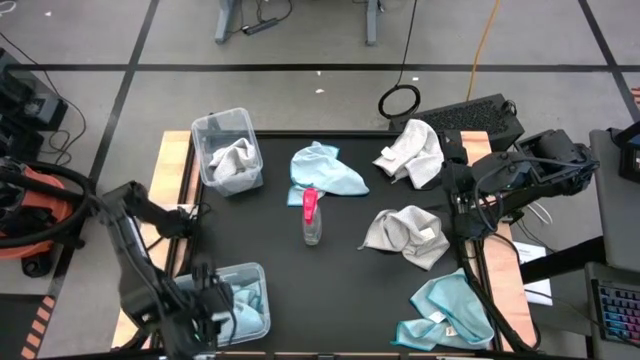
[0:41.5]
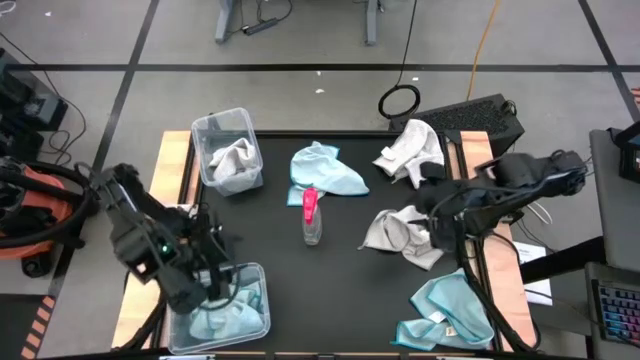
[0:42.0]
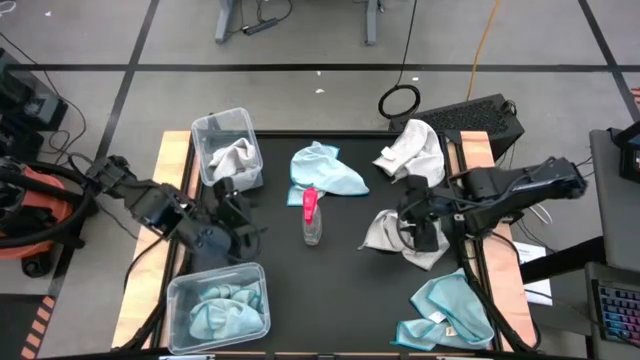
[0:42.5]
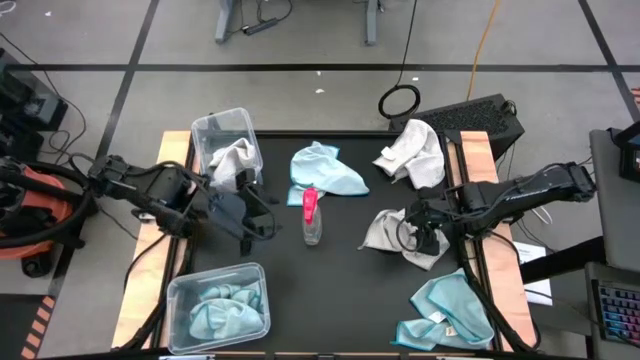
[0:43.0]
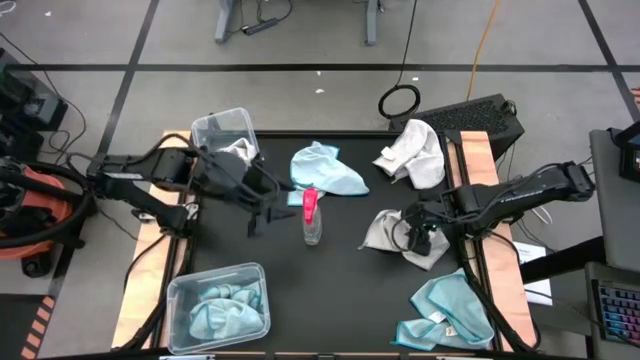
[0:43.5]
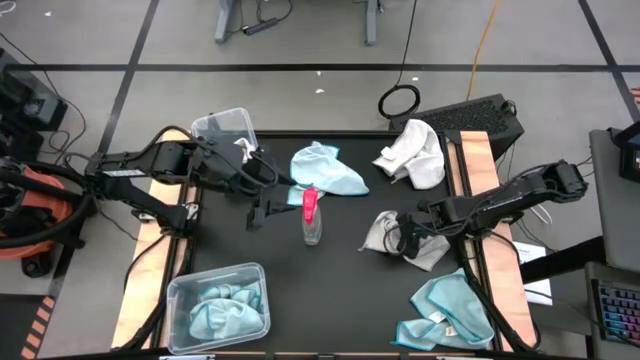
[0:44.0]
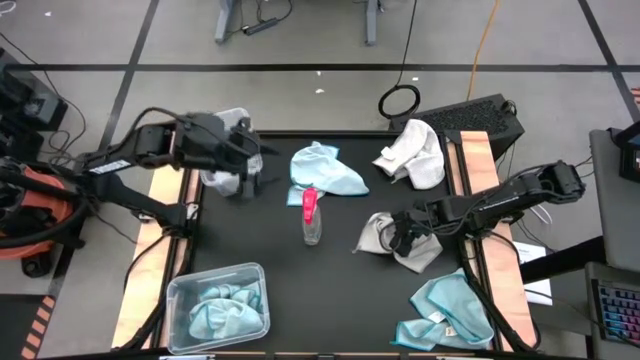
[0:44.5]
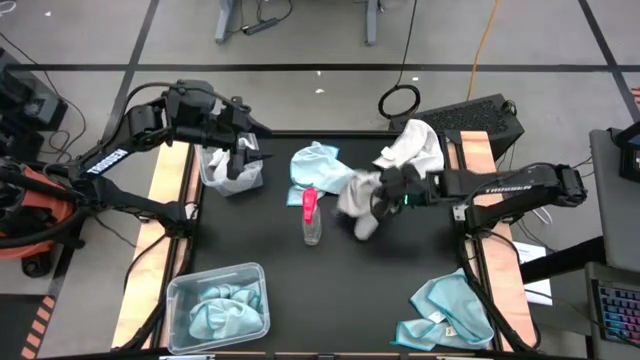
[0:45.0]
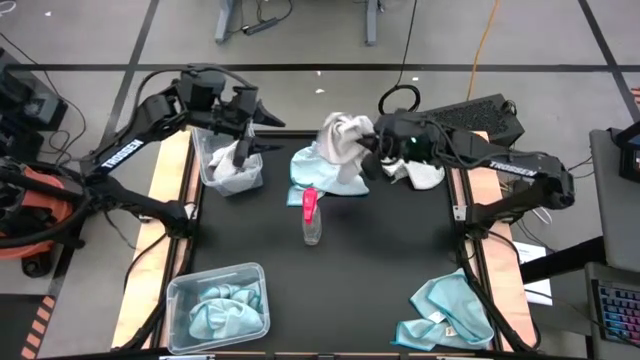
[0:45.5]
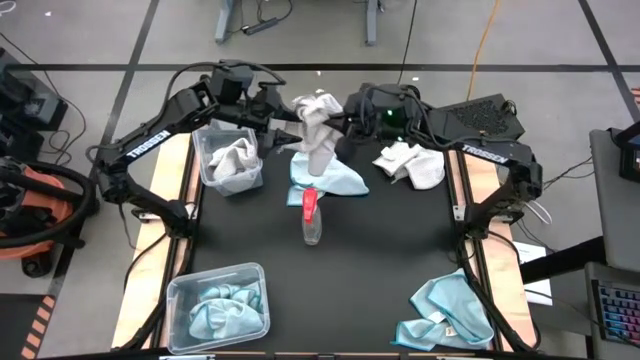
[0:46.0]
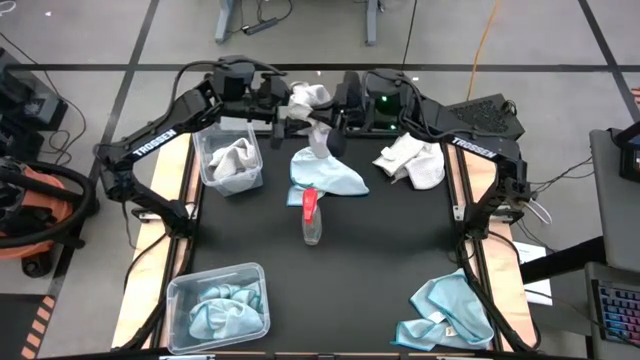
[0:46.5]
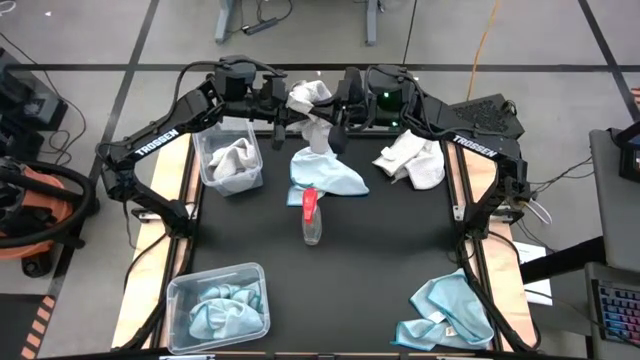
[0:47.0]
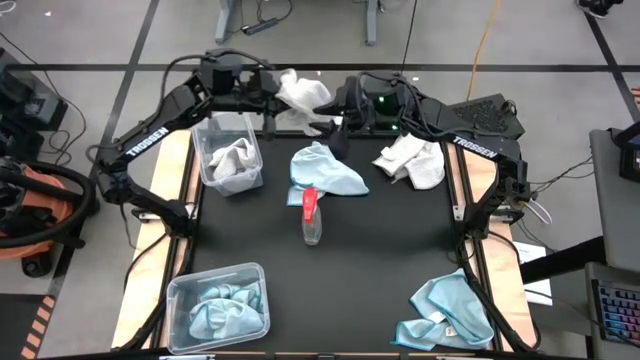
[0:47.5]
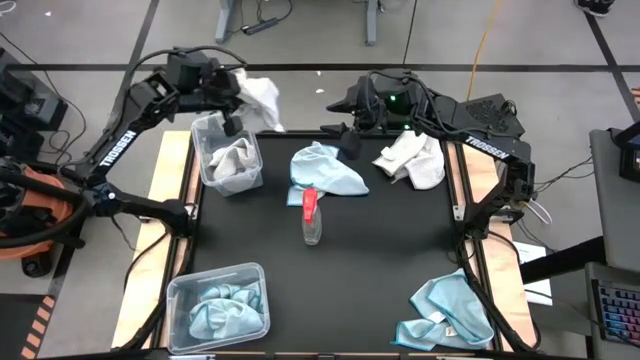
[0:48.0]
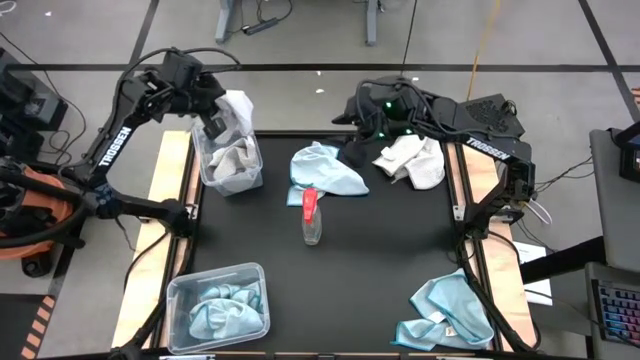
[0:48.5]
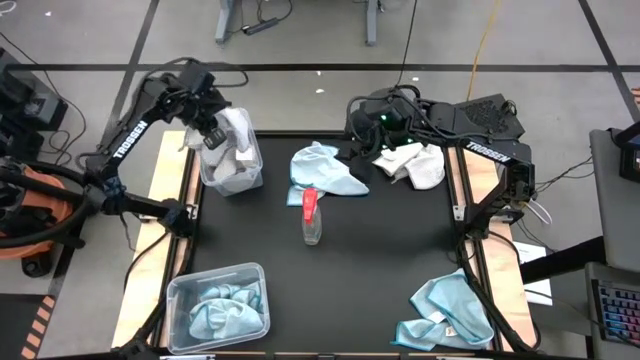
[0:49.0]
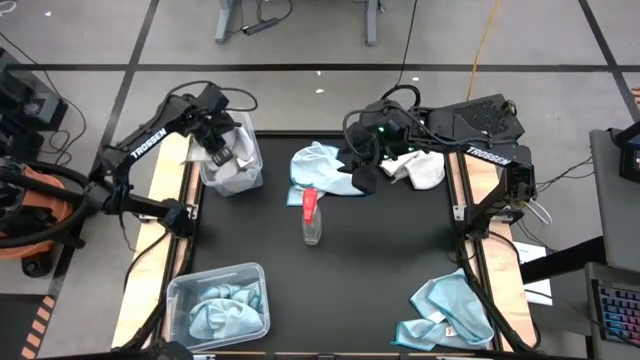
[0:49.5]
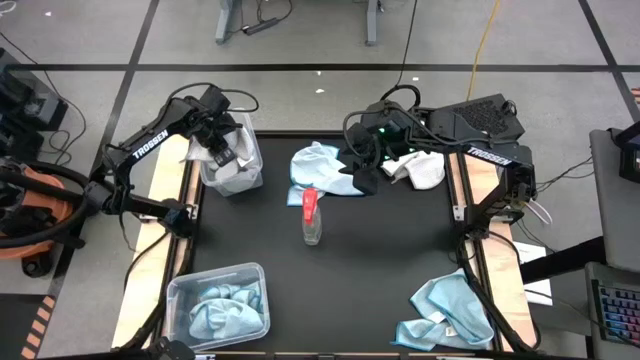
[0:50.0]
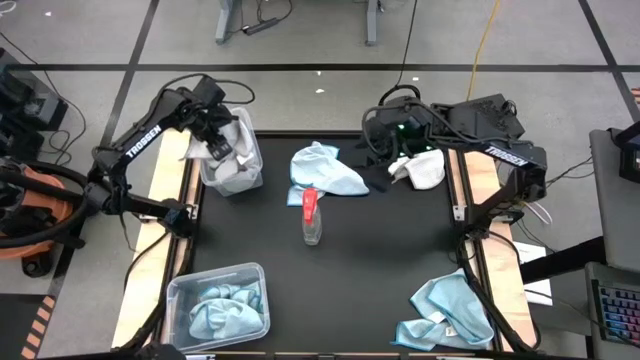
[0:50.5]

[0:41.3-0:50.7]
Task: Sort microfiber towel by color & place in baskets
Put the gray towel into the top transparent bin

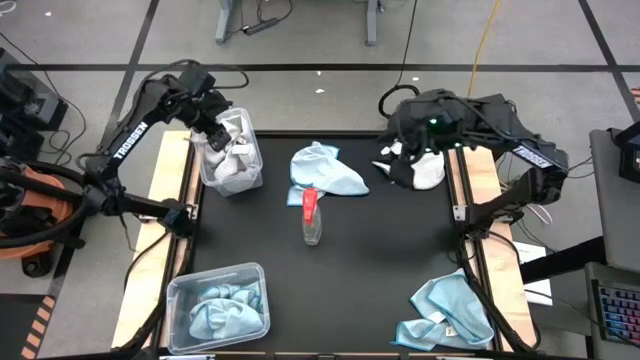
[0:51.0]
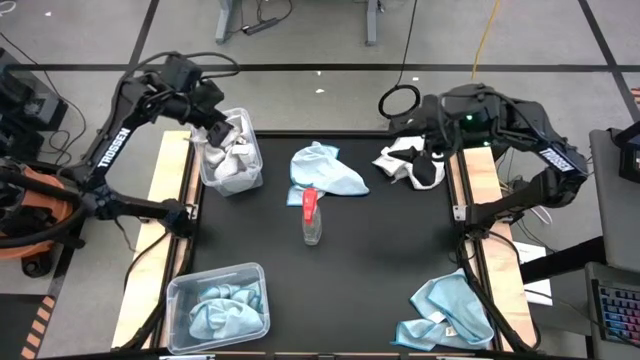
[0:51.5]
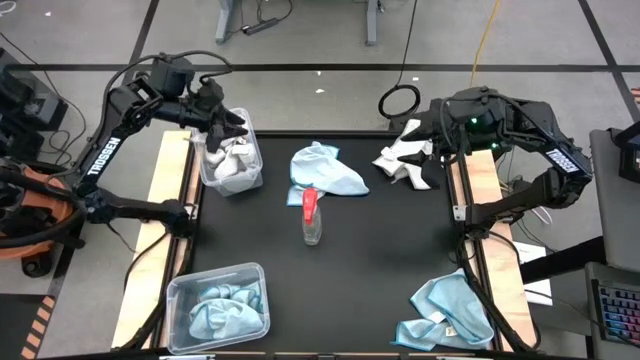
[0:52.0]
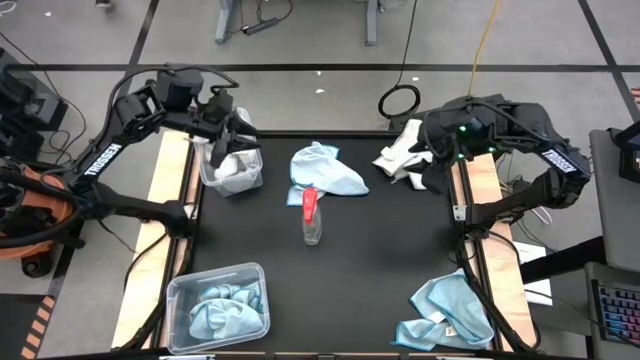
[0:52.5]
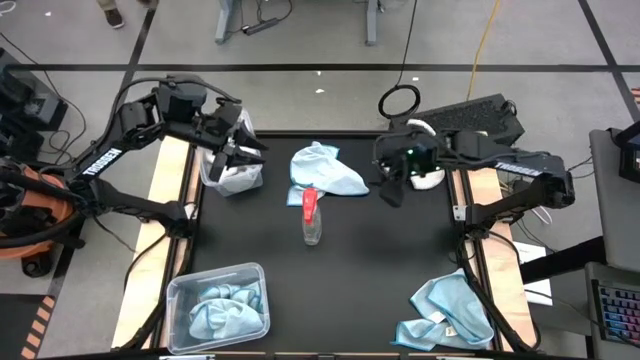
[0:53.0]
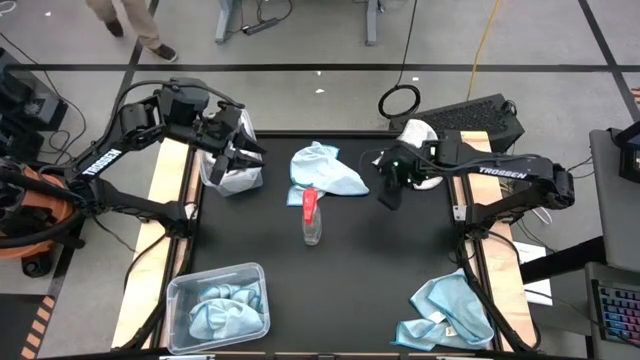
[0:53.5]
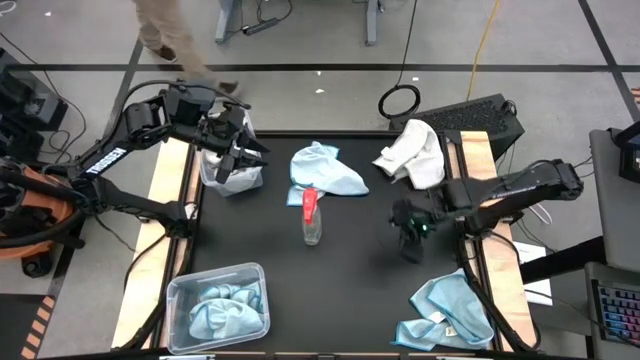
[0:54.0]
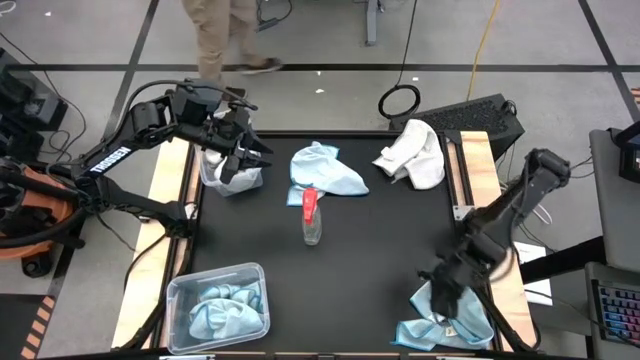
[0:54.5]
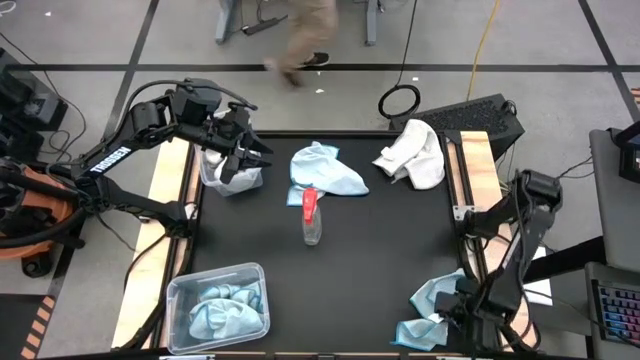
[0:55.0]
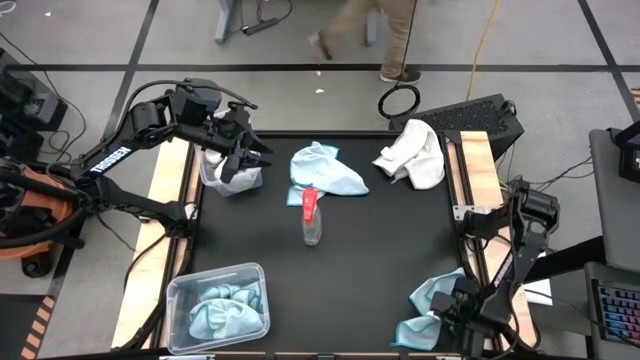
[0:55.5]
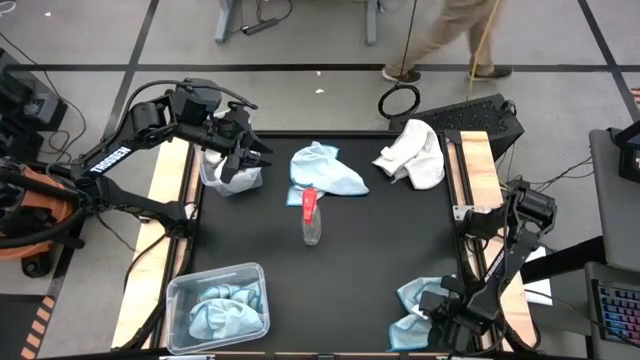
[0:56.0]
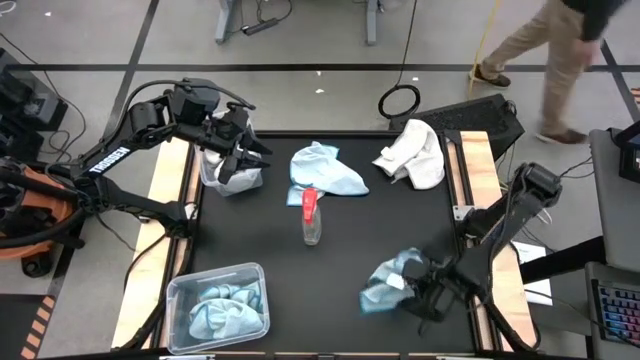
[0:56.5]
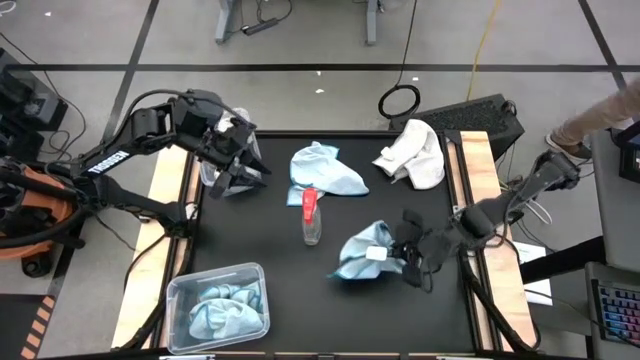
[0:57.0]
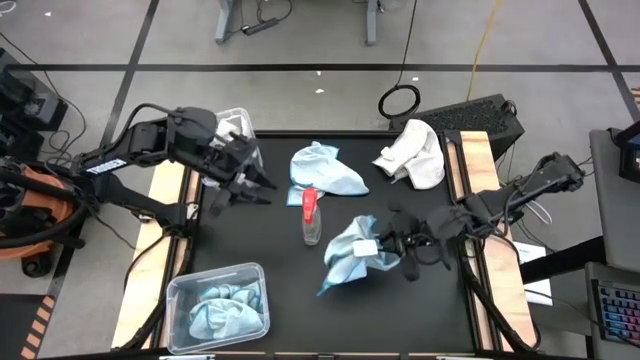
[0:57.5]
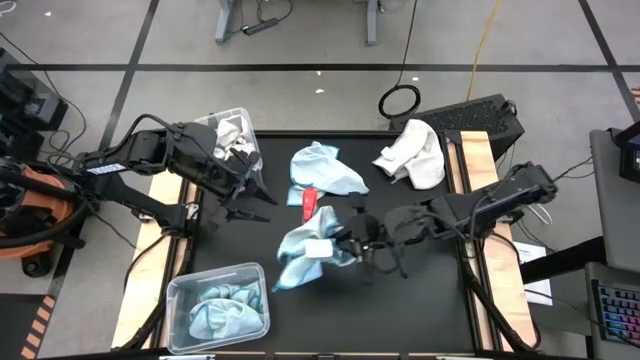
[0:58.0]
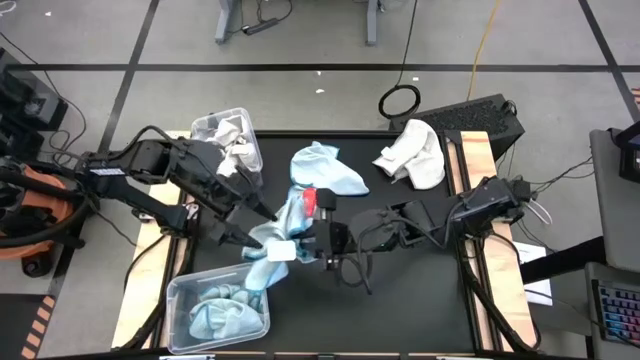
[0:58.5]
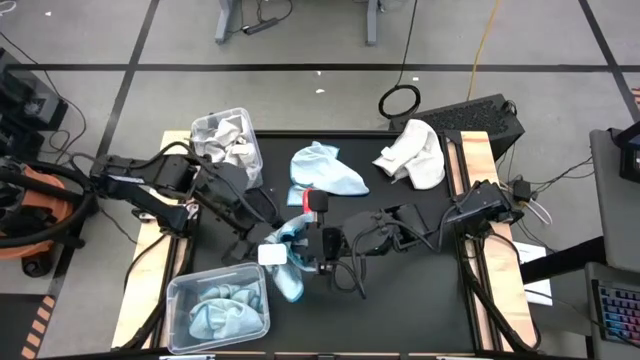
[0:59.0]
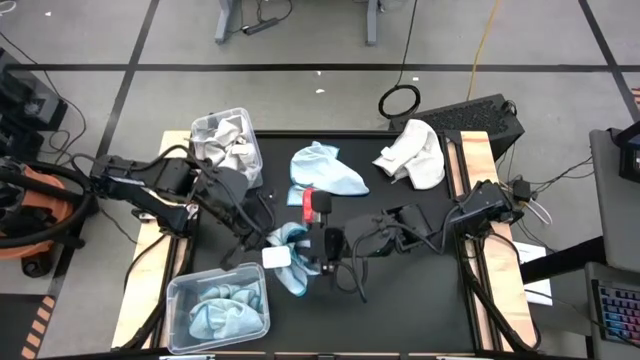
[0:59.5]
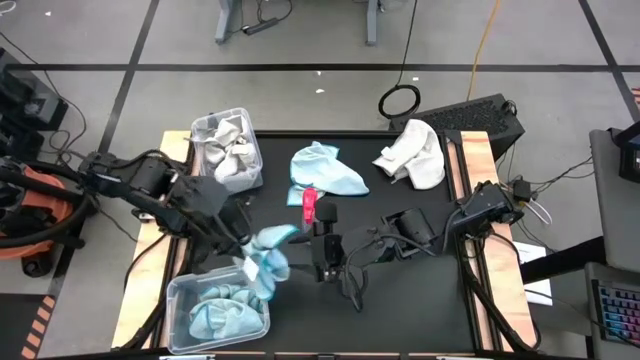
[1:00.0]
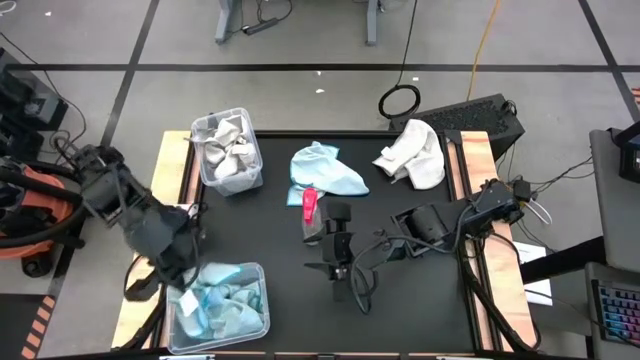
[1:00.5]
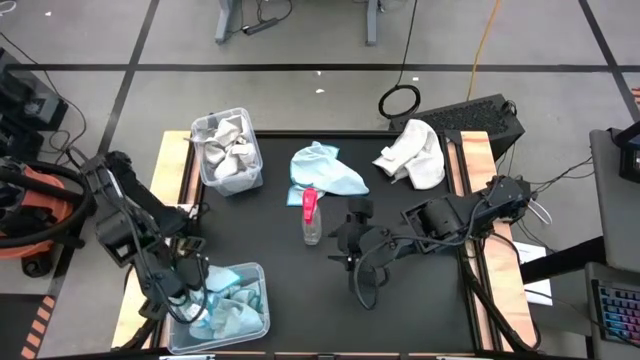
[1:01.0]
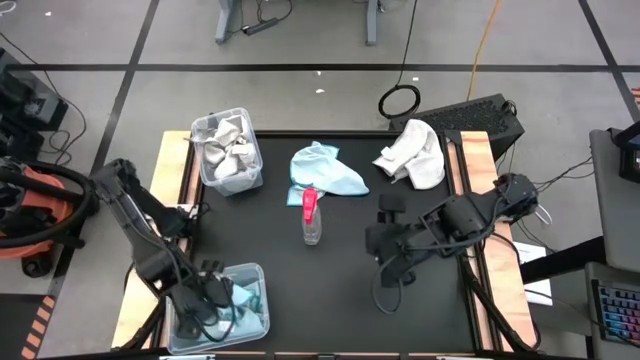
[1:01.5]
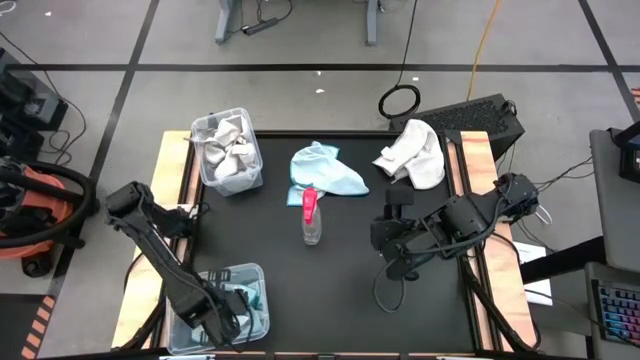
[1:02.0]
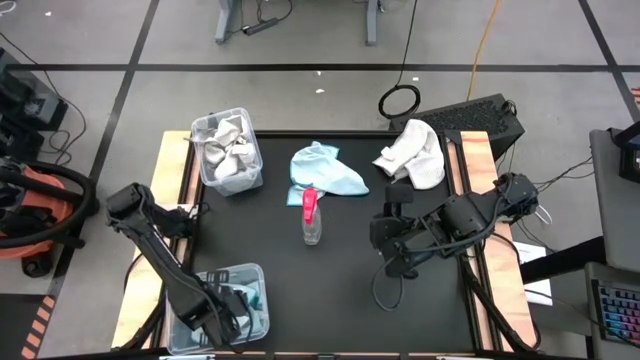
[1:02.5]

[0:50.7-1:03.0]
Put the blue towel into the bottom transparent bin
